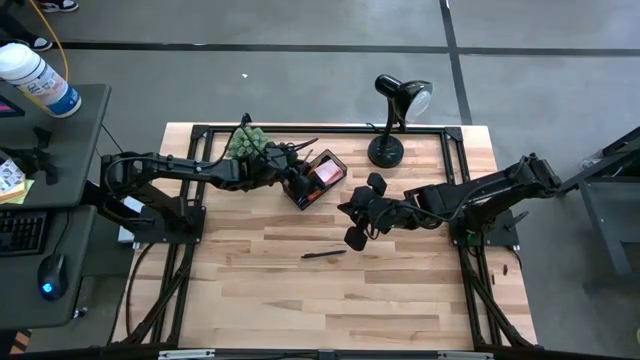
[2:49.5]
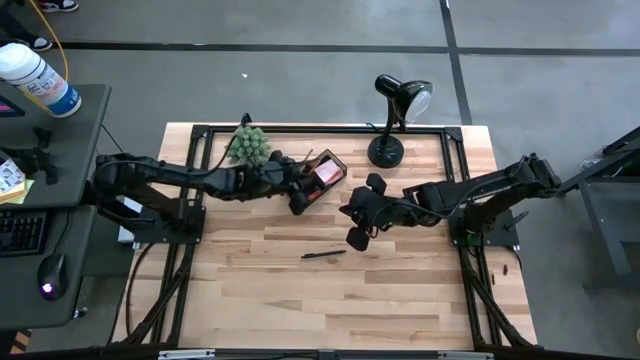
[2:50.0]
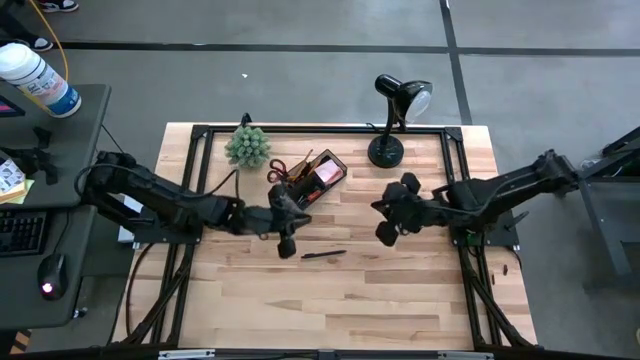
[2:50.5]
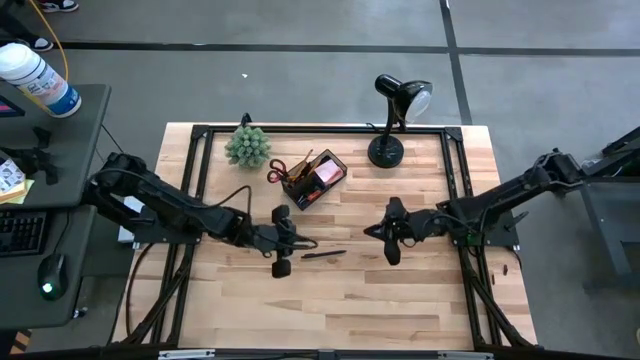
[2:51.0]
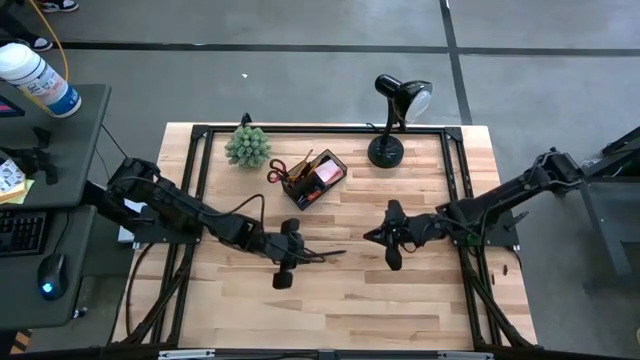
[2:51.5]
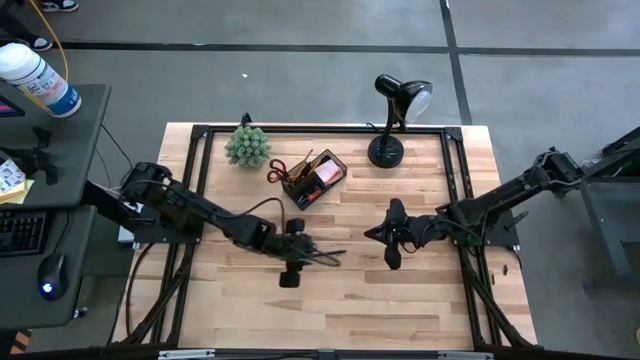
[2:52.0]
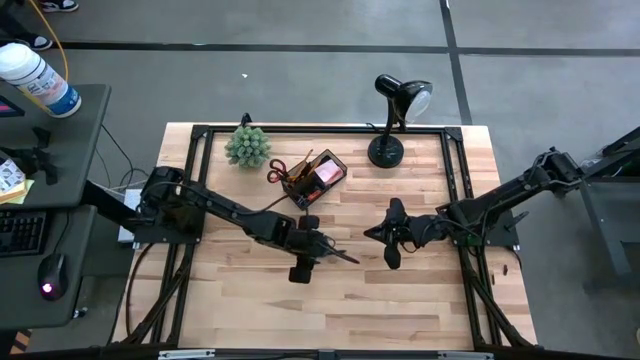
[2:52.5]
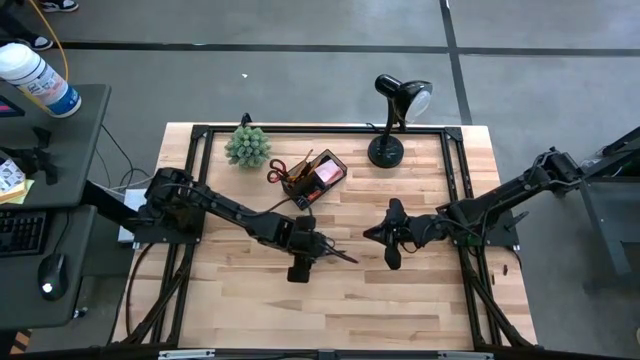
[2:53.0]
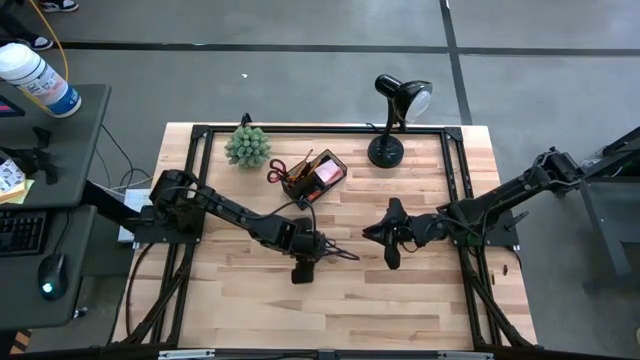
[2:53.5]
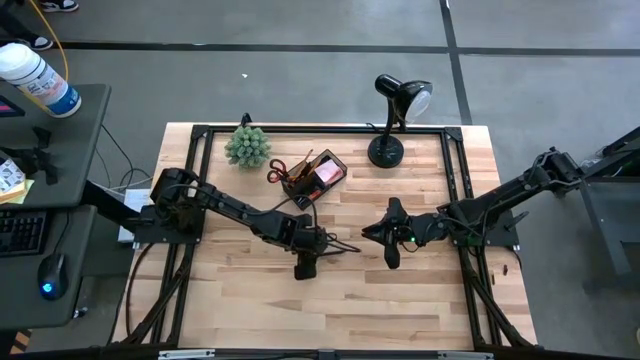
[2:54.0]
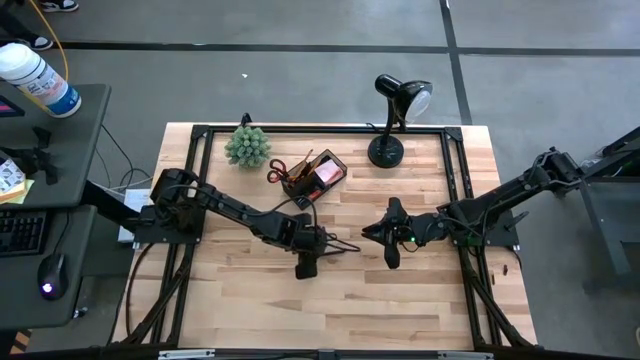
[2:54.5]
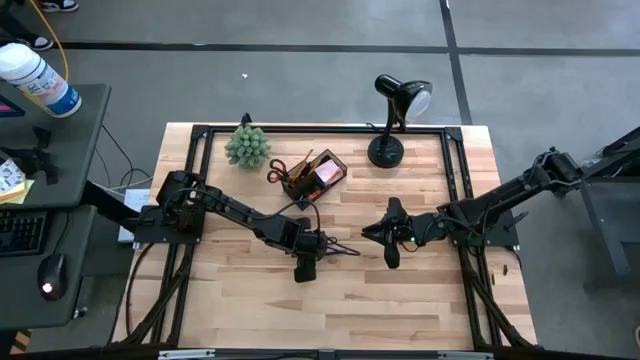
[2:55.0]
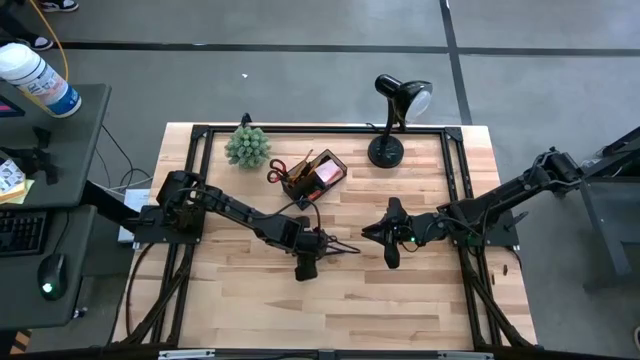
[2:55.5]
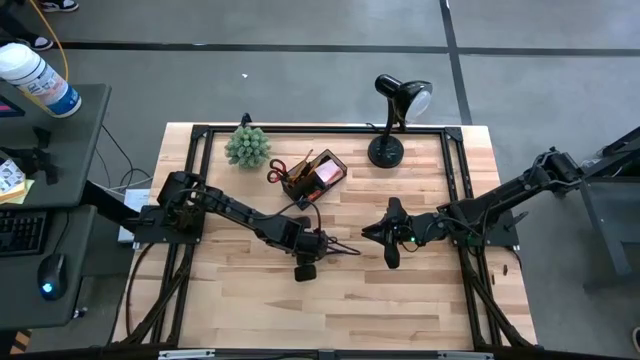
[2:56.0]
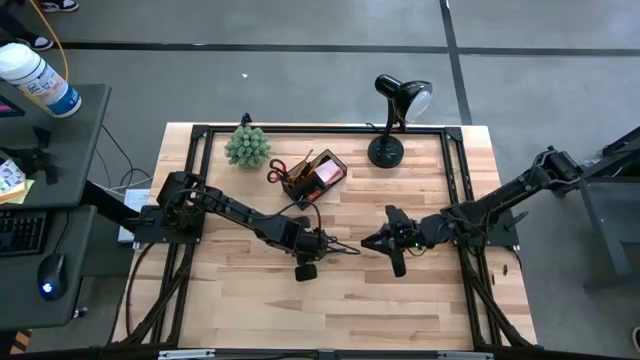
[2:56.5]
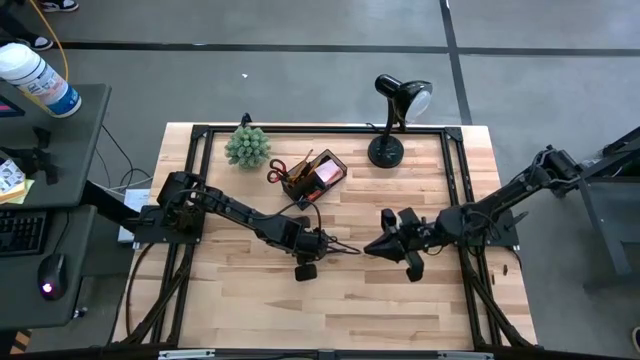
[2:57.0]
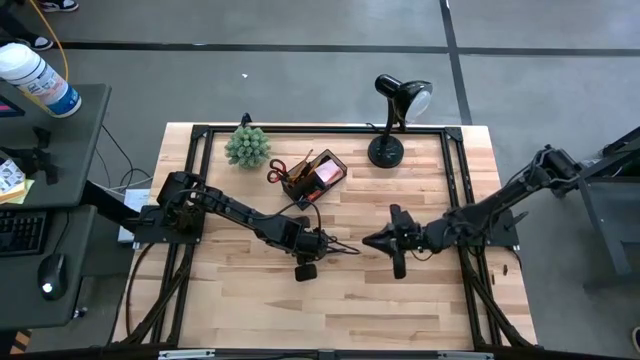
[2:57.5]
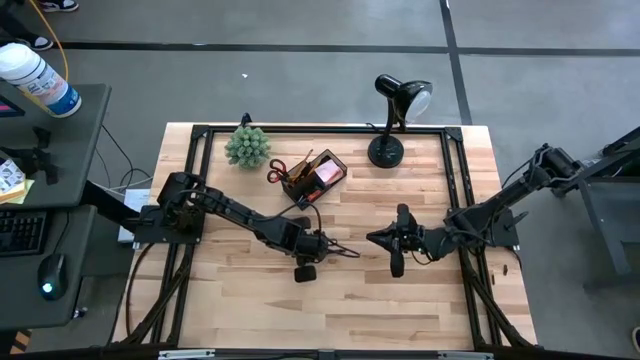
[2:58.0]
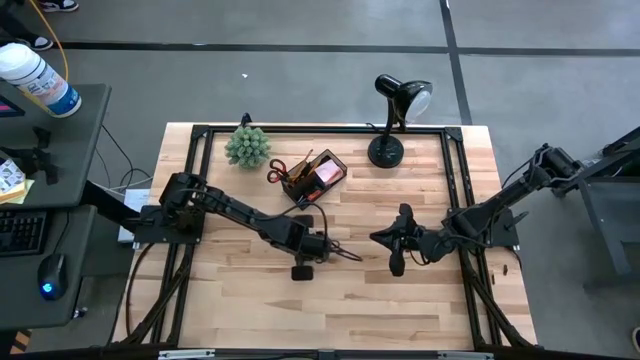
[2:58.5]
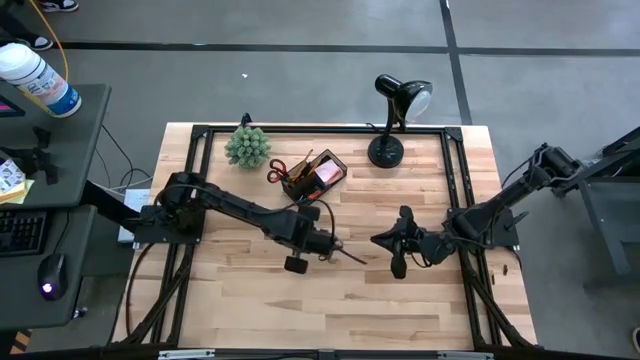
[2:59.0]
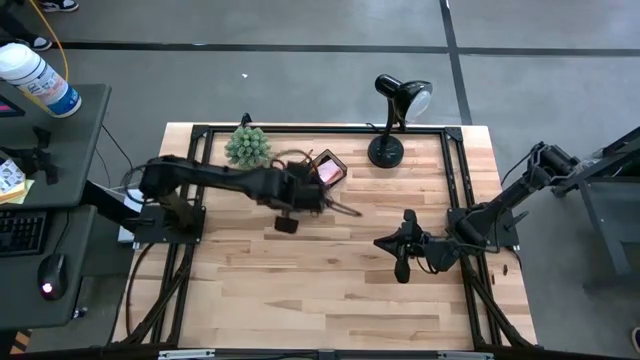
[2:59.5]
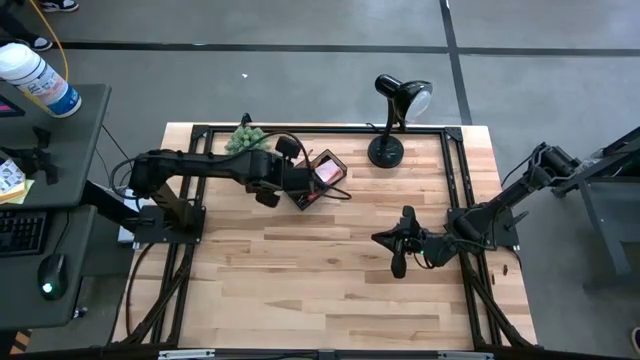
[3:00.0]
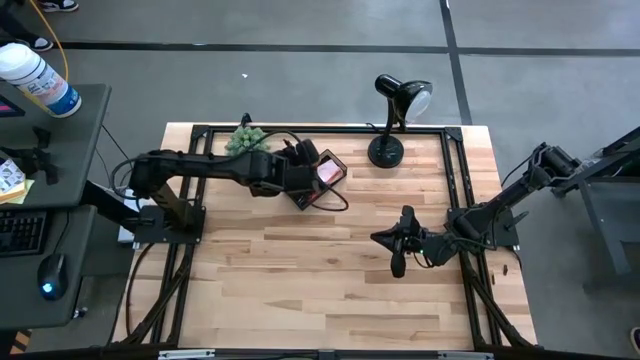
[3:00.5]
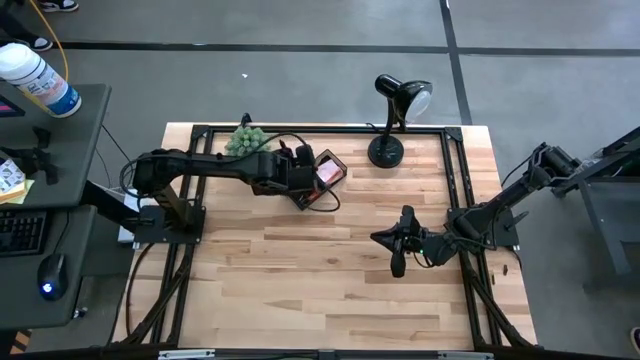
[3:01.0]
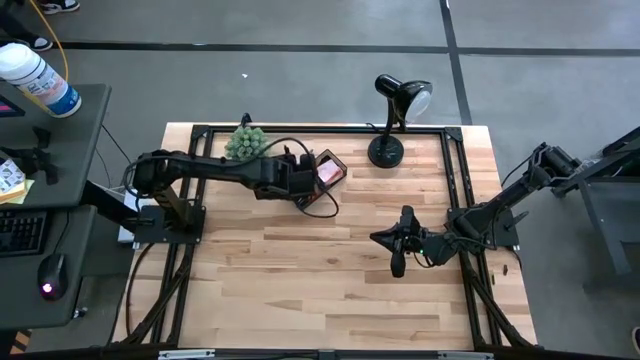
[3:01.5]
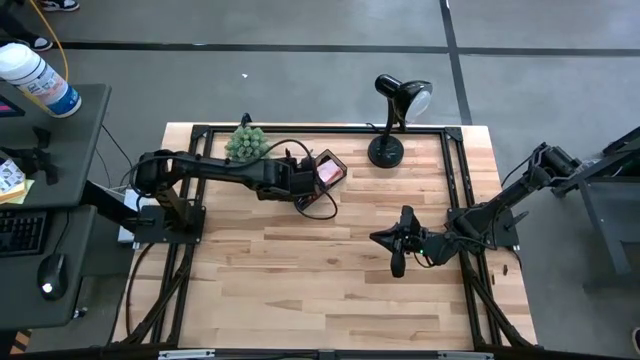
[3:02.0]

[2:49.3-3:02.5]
Task: Pick and place office supplies into organizer
Put the black pen into the black desk organizer

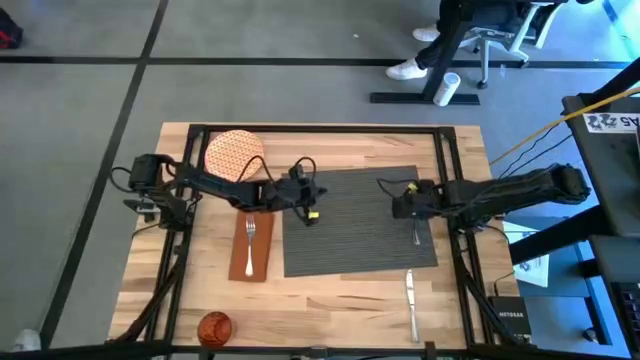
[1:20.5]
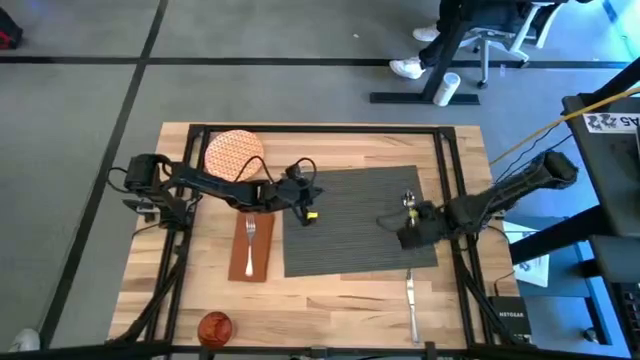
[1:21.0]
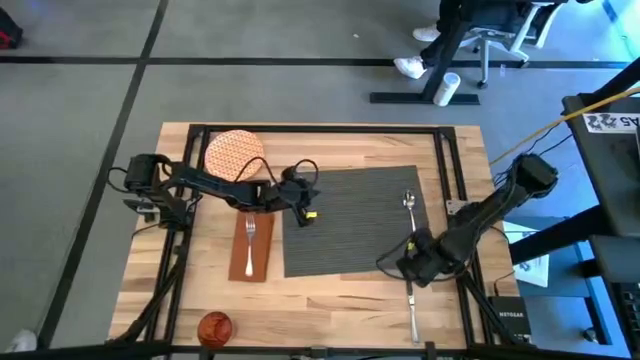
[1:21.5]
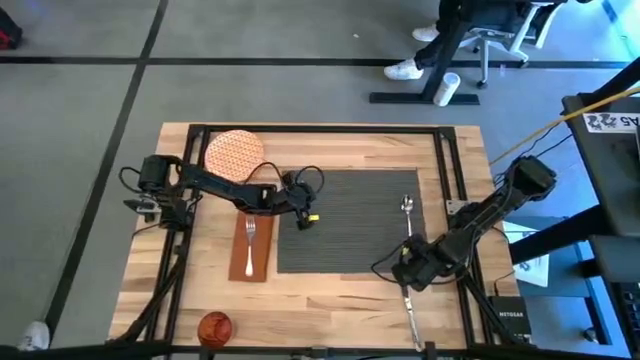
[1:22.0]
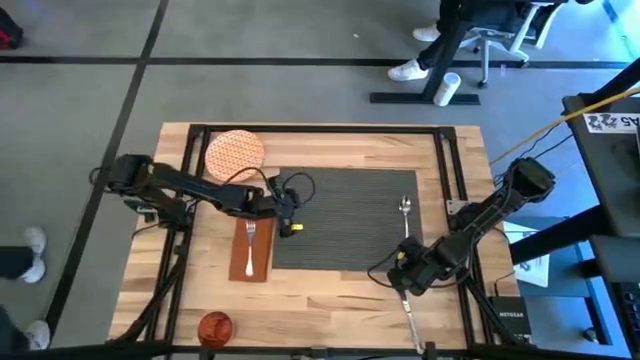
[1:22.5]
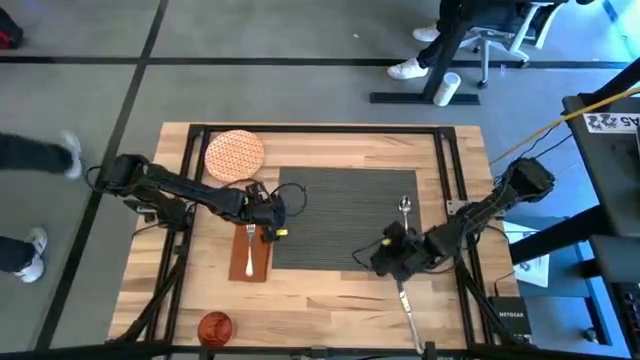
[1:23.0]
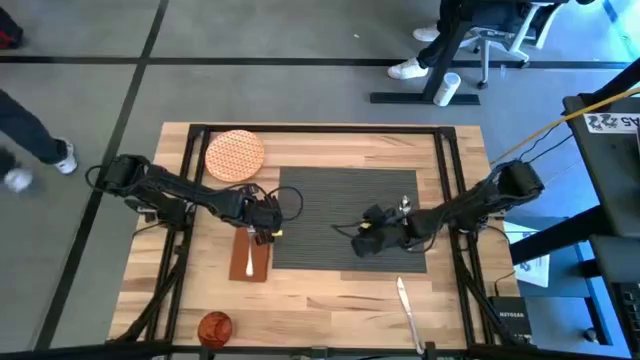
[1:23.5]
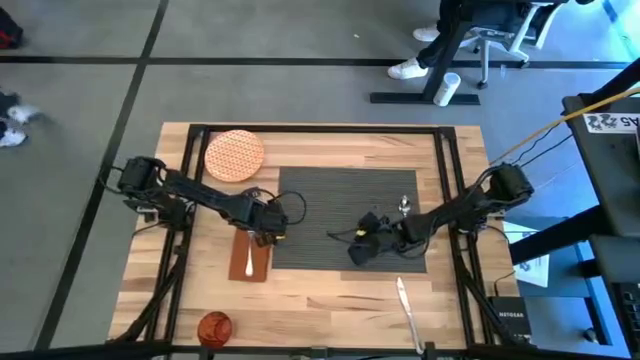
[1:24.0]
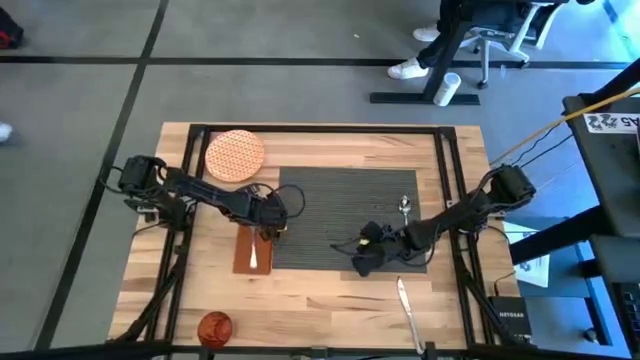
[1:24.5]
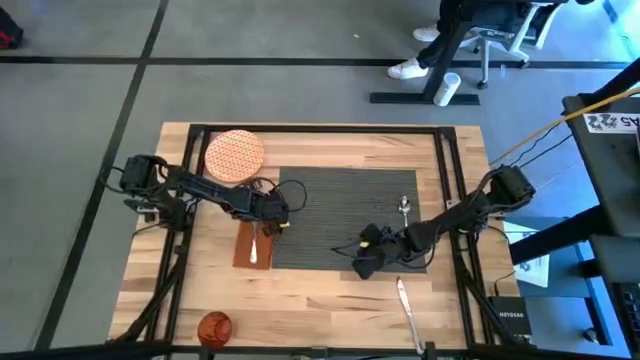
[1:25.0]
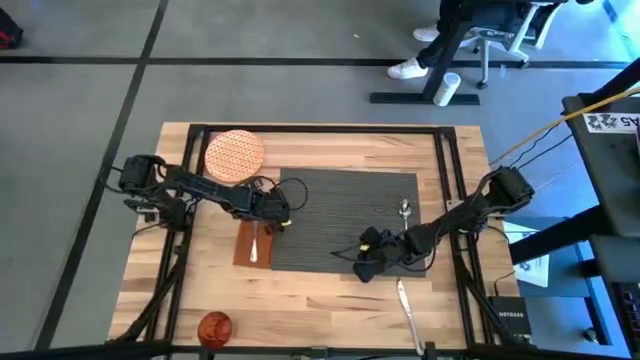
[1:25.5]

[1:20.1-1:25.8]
Task: Set table place
Adjust the gray tablemat and orange table napkin

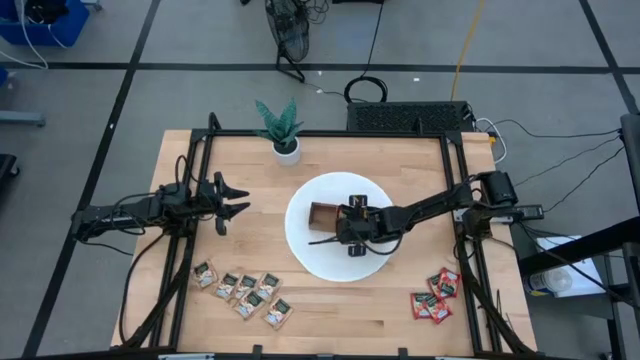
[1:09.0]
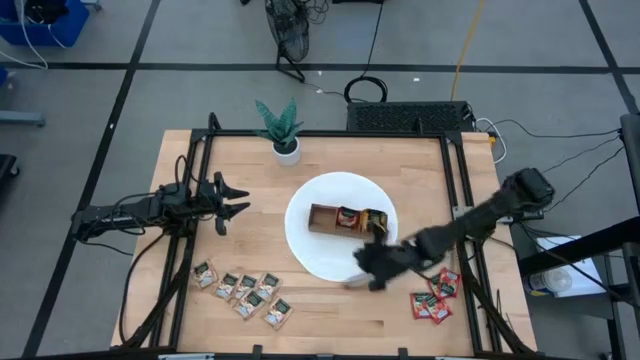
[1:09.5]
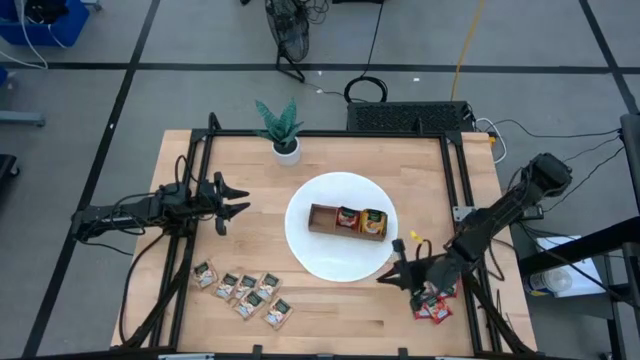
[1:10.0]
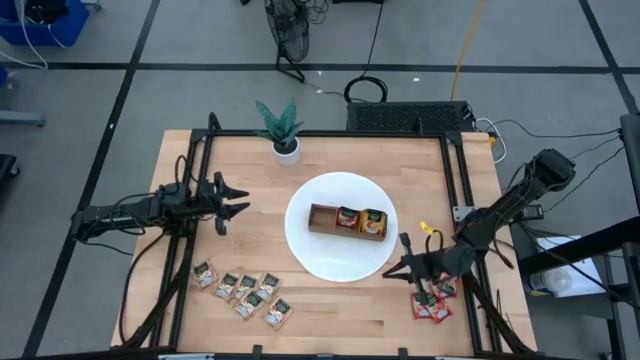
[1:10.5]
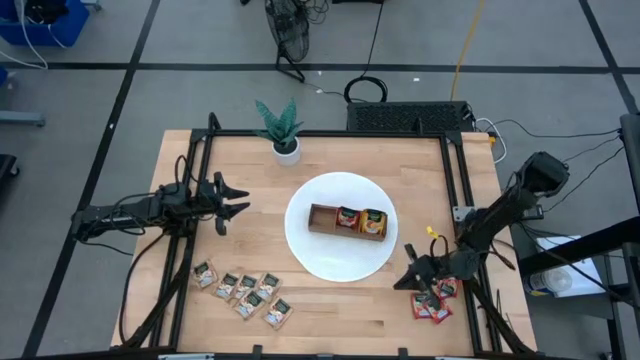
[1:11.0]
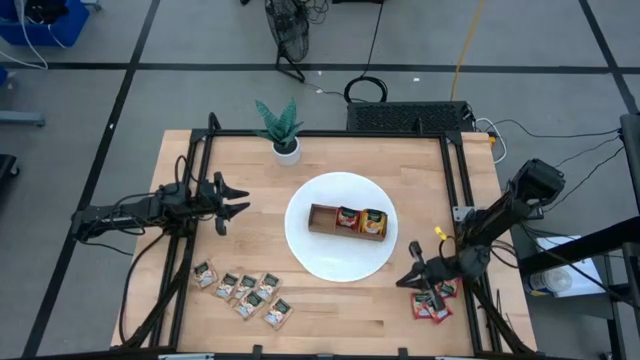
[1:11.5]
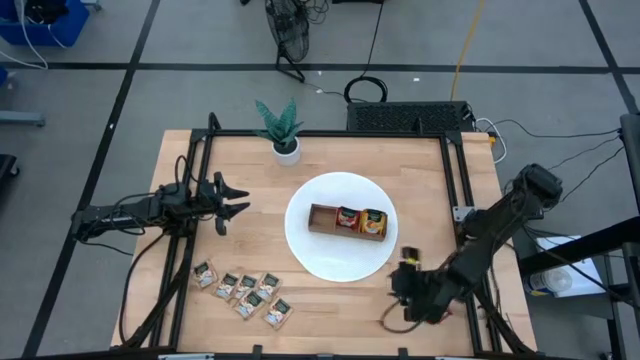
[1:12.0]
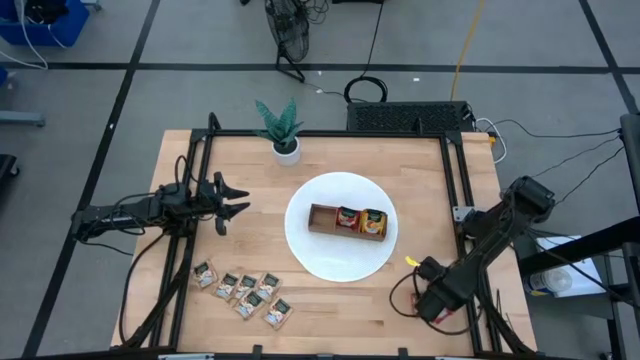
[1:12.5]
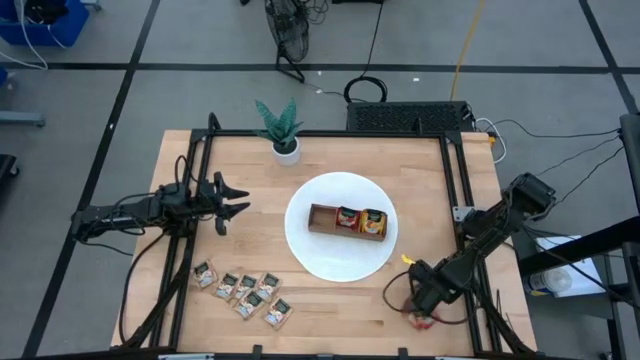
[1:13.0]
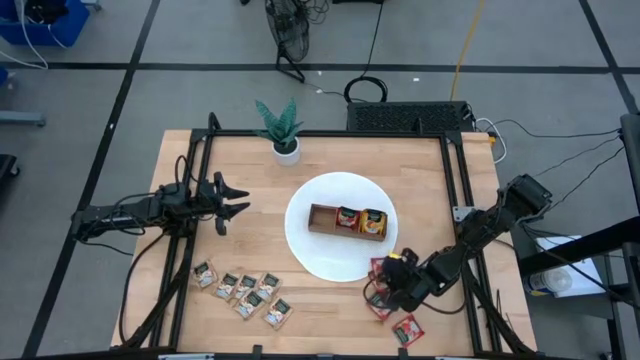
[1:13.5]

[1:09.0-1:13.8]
Task: Pick & Place Tea
Adjust the red tea bags
